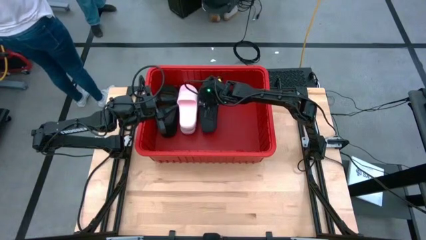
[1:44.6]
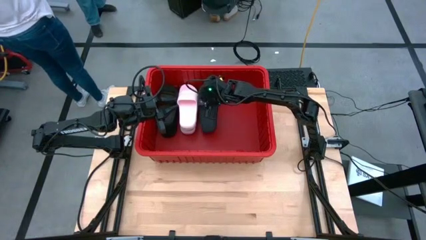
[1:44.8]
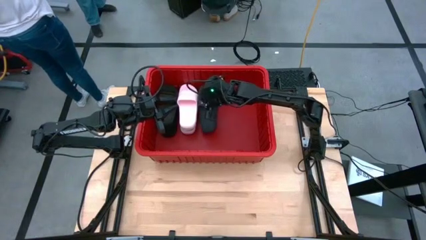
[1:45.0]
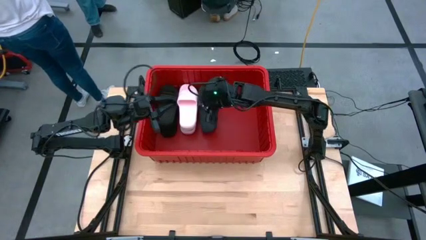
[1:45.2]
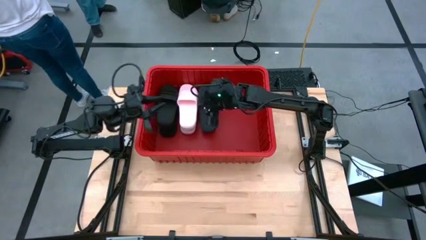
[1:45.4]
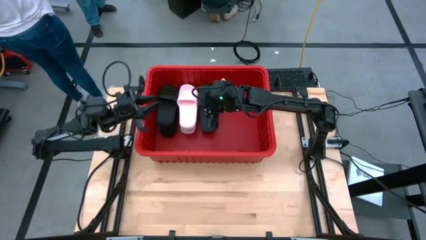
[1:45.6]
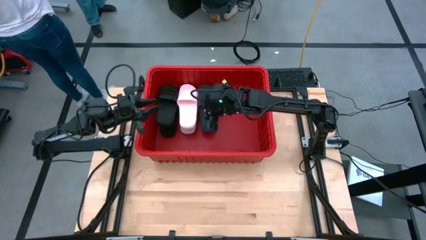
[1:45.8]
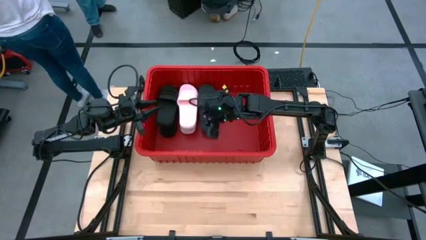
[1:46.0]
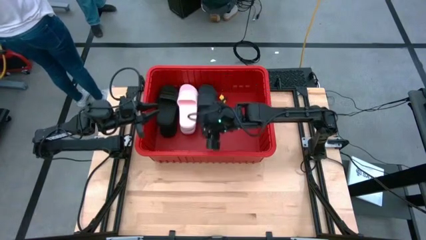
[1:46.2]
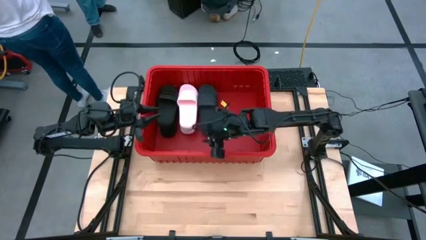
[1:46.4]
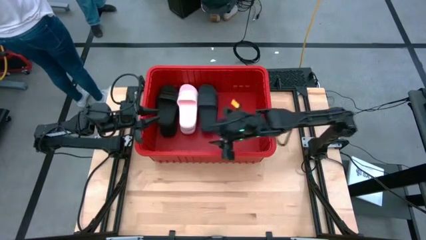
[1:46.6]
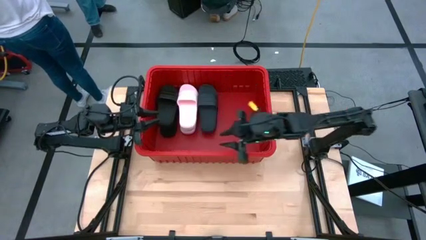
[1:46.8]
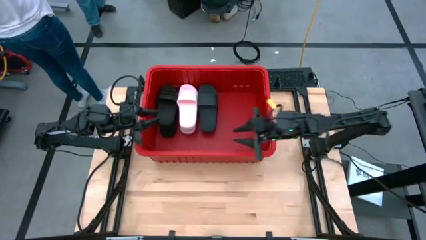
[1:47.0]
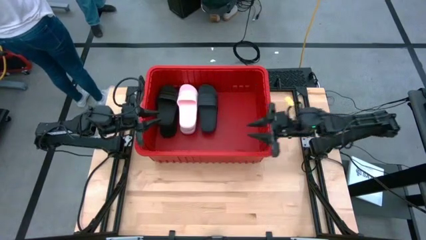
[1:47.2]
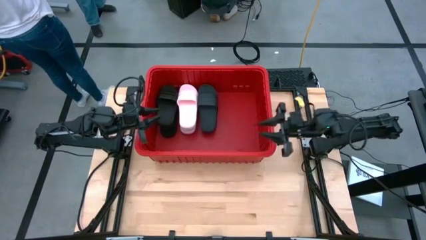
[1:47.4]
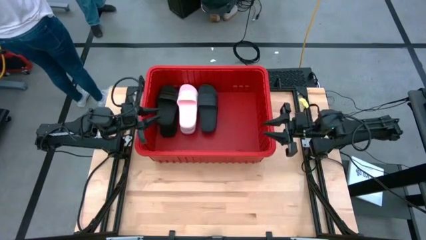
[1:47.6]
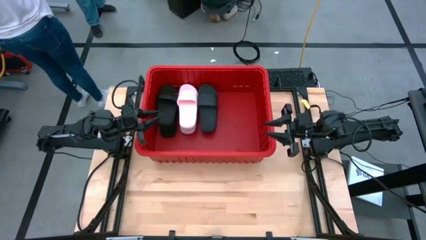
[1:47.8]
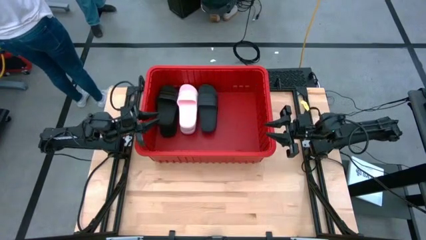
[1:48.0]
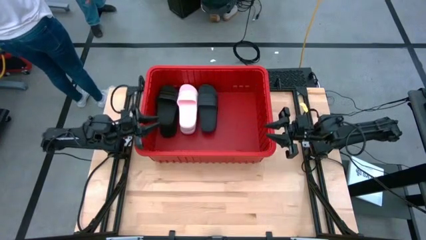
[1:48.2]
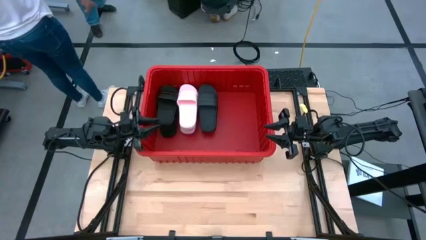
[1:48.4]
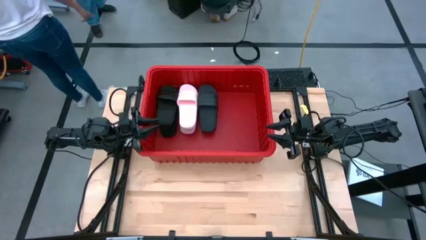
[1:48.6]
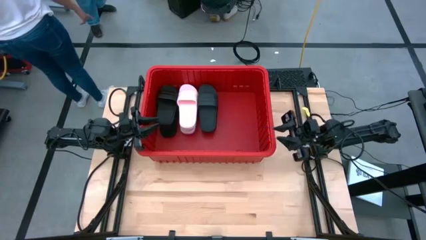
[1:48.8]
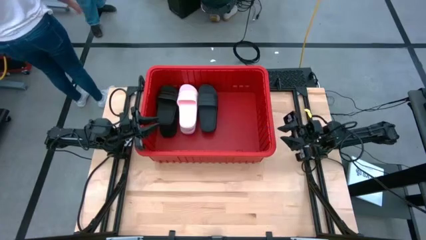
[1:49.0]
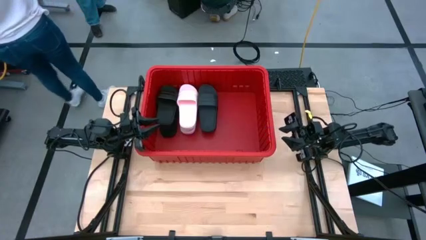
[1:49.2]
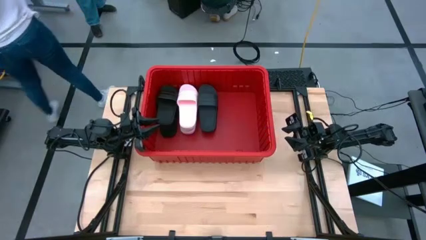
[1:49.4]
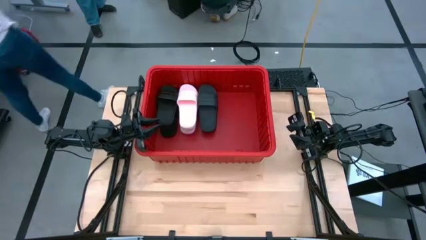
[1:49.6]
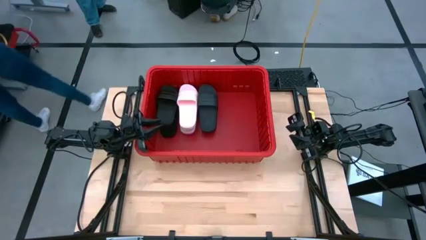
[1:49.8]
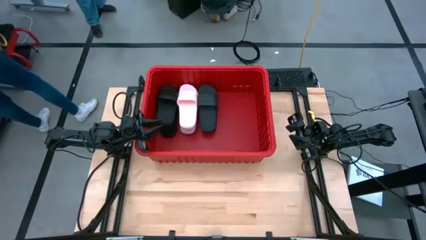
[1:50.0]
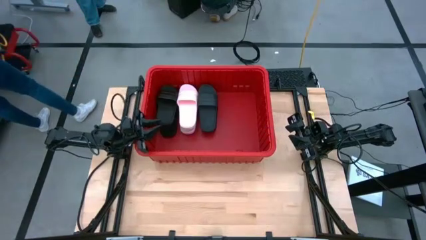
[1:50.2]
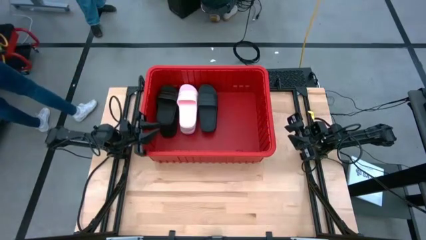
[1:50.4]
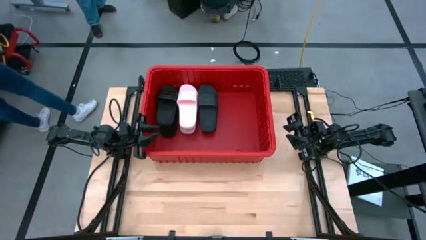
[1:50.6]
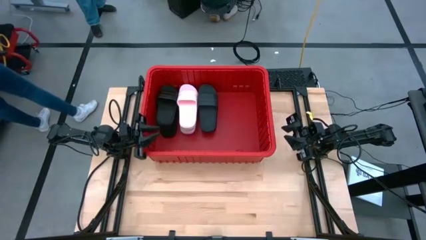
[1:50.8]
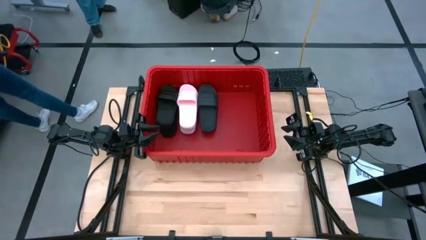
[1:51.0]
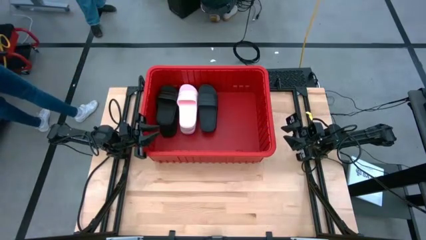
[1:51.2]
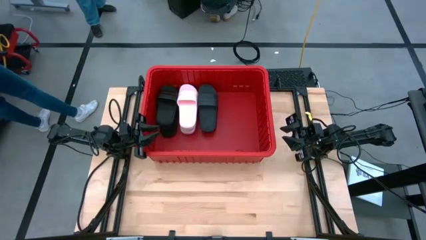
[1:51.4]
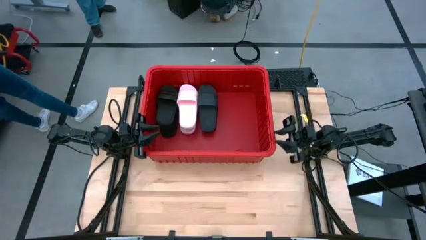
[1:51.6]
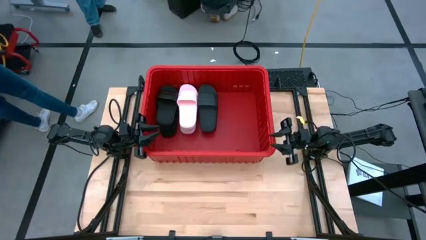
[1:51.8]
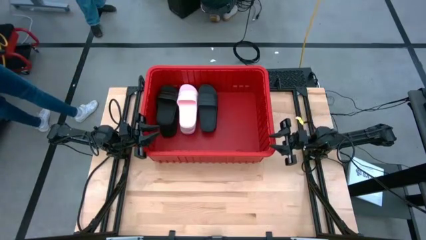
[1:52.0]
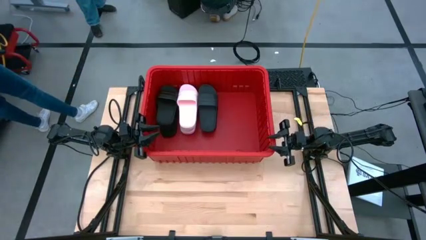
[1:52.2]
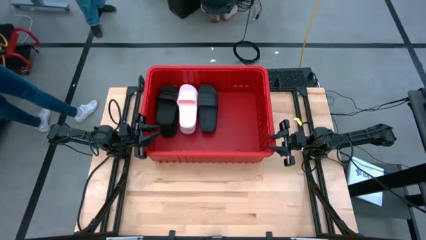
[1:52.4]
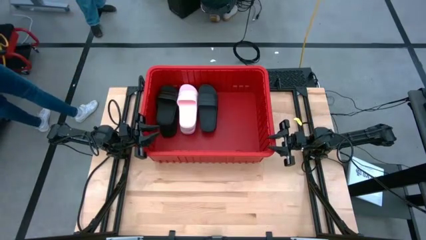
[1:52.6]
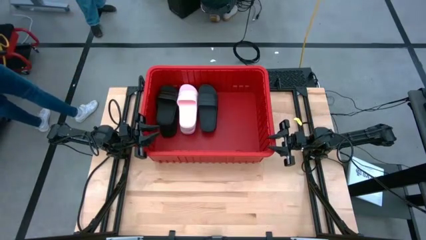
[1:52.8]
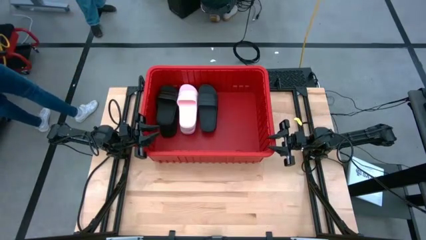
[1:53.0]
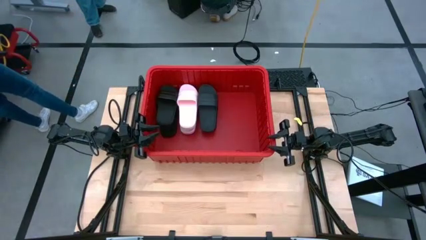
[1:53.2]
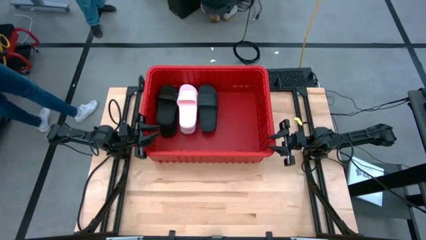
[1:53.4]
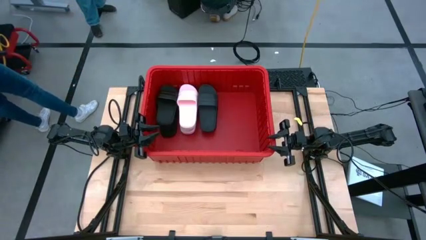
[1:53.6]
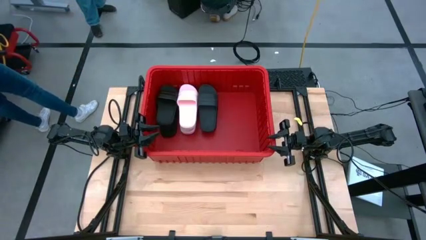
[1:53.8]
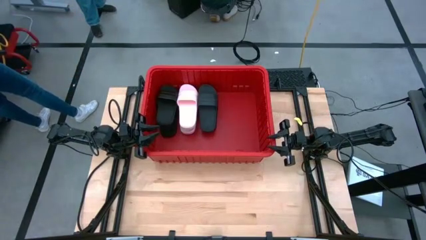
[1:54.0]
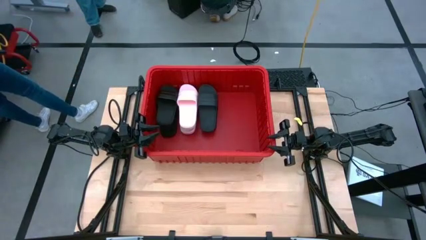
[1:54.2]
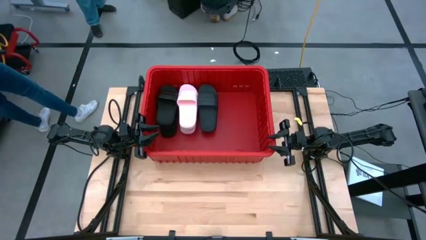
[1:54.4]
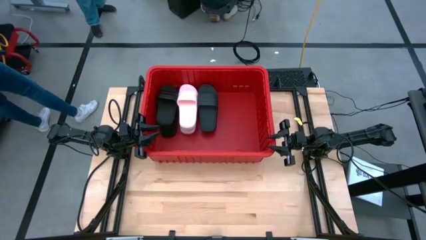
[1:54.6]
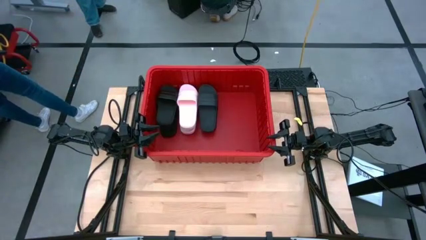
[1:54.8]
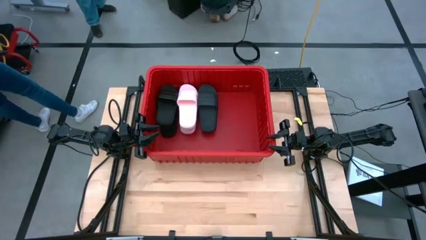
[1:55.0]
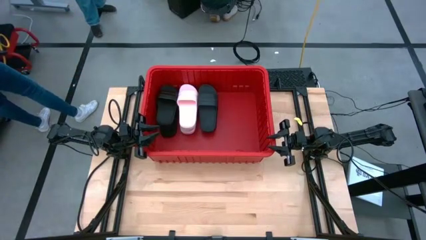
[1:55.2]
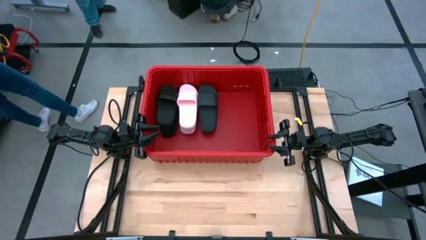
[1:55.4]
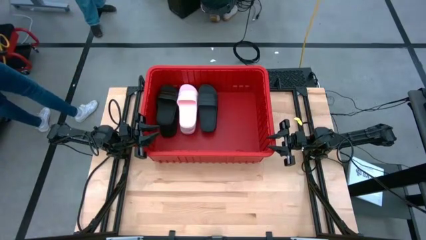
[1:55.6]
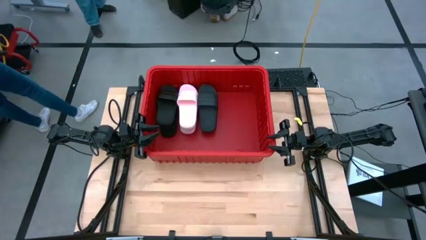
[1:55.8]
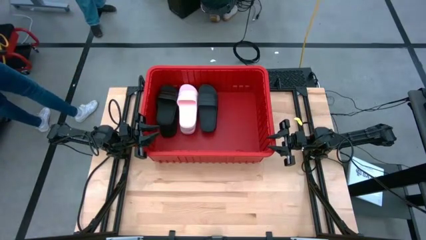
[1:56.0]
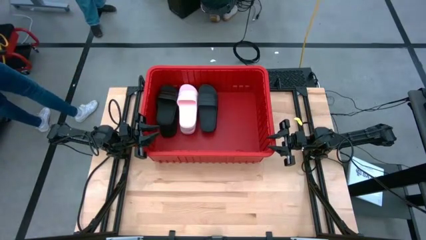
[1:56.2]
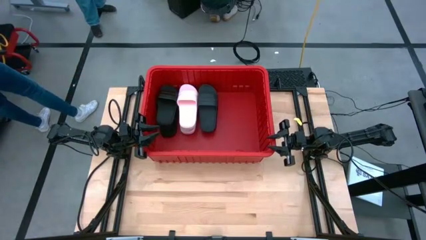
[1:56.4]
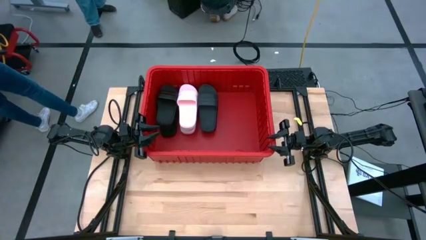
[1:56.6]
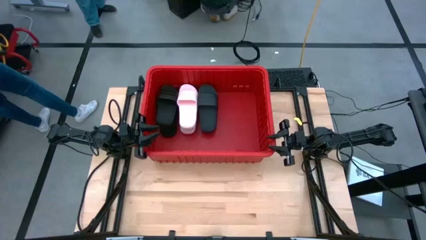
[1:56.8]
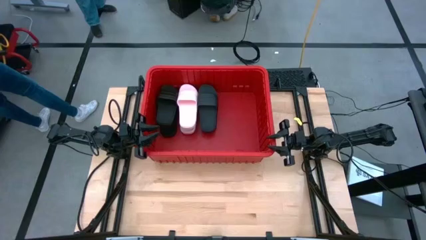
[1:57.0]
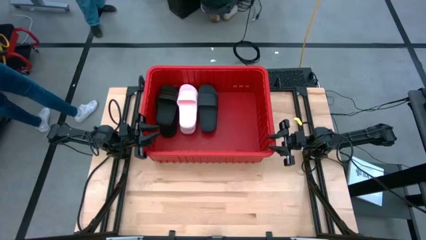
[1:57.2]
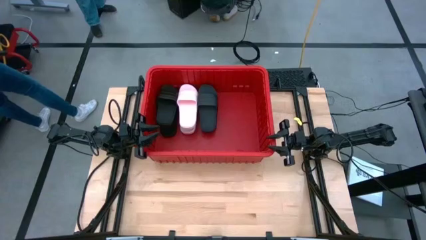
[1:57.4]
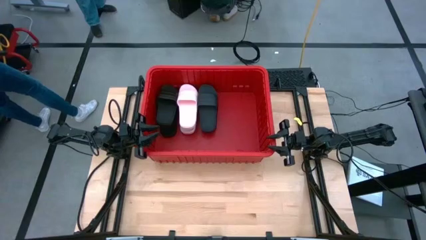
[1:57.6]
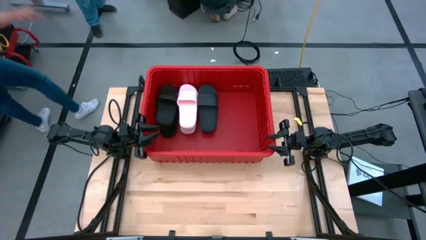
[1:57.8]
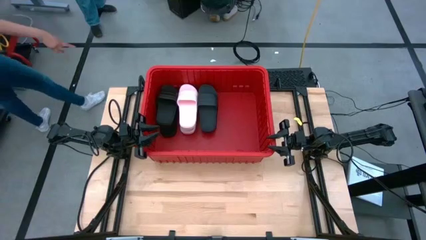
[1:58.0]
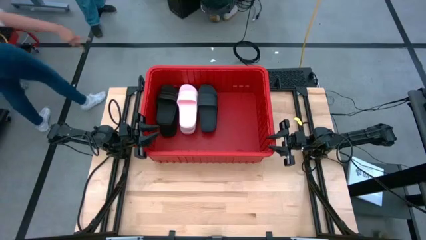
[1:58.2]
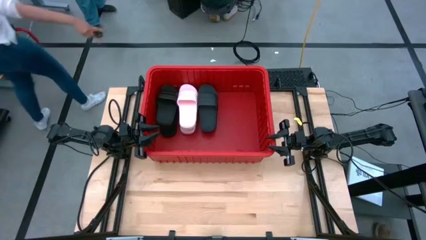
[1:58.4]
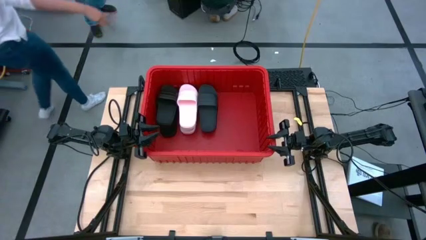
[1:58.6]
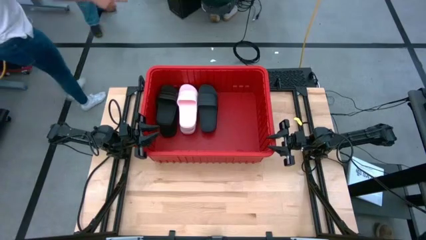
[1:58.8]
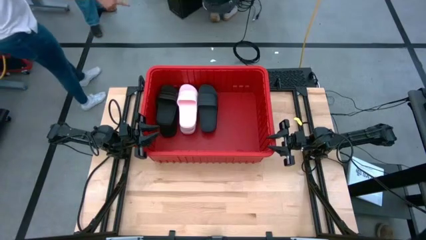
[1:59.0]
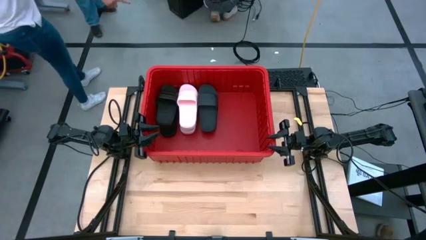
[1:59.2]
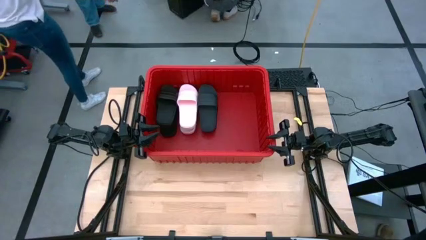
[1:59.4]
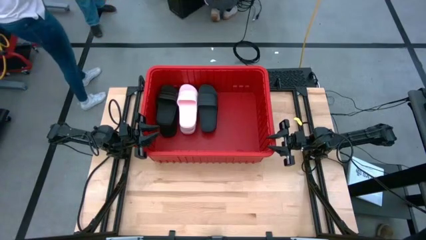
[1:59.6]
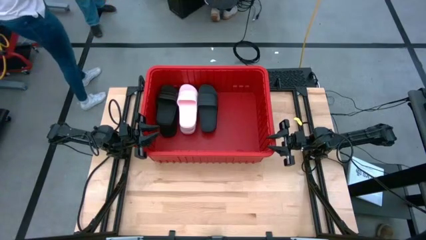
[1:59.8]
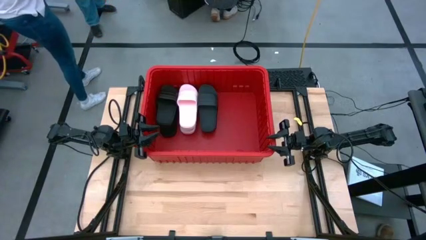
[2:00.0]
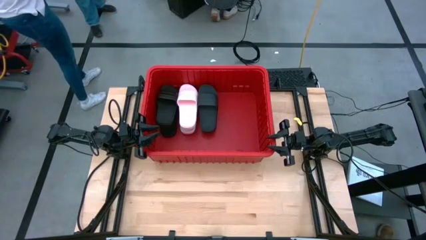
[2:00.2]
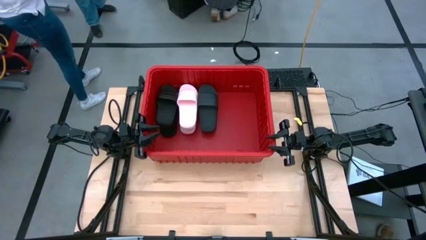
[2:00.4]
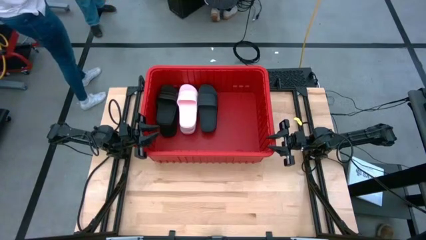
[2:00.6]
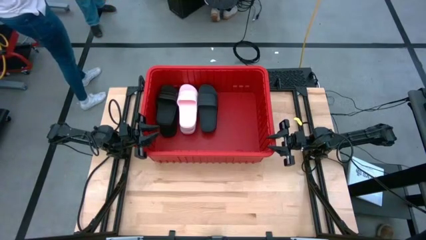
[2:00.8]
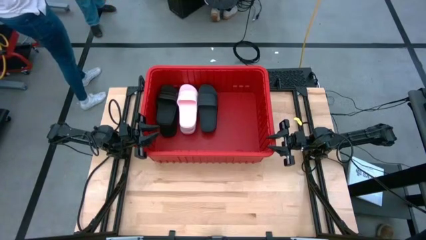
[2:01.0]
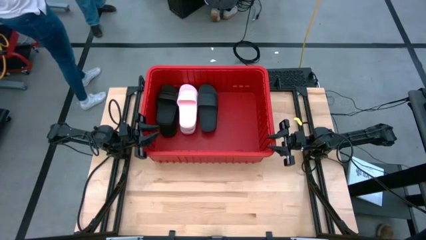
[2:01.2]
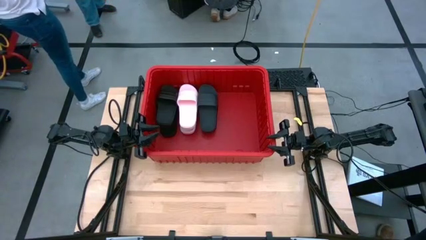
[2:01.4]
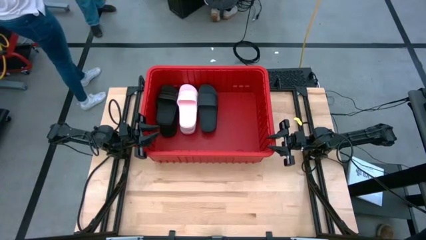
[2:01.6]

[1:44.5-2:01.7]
Task: Pick and place slides into bin
Return to Home Position
